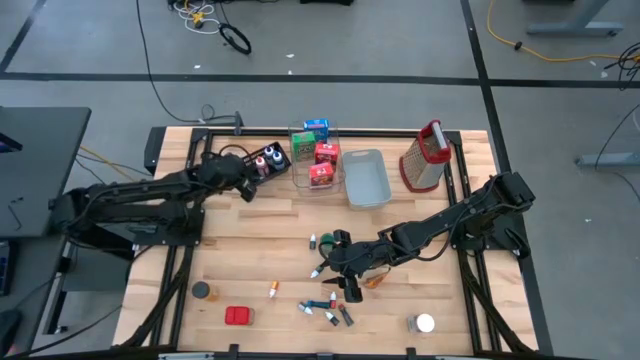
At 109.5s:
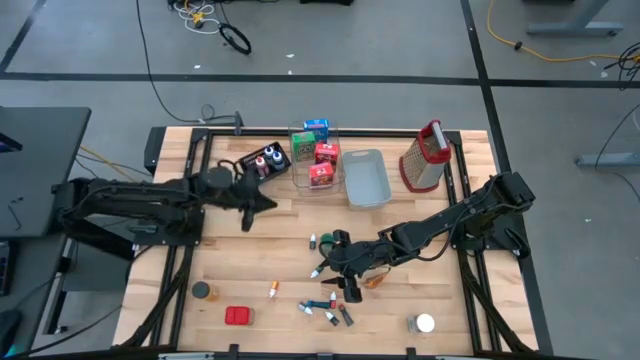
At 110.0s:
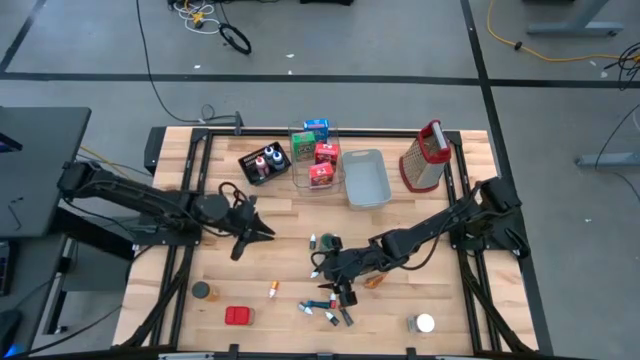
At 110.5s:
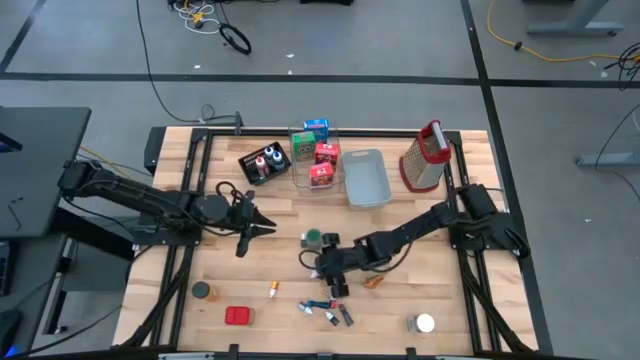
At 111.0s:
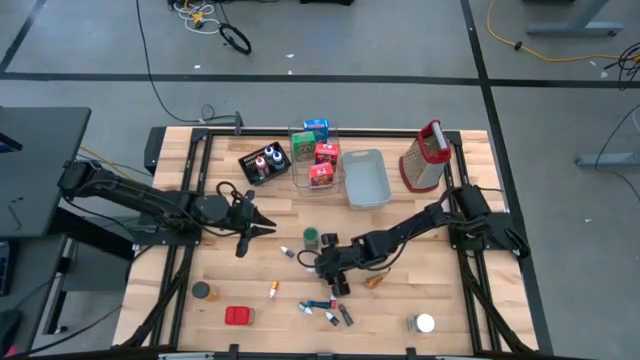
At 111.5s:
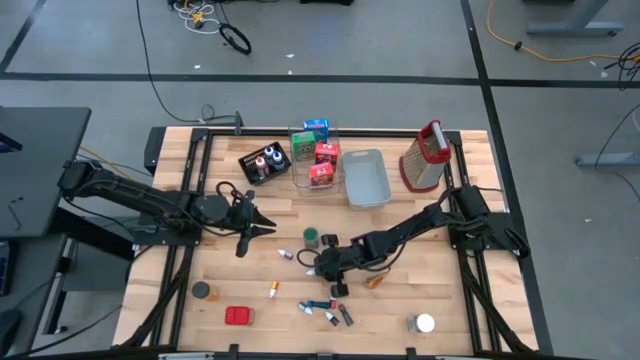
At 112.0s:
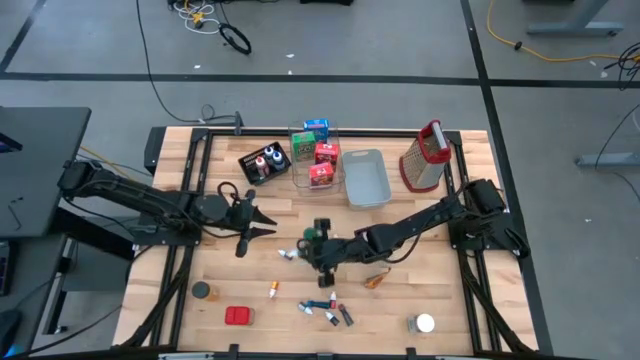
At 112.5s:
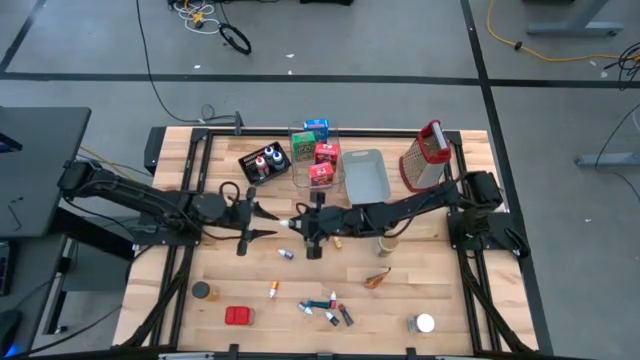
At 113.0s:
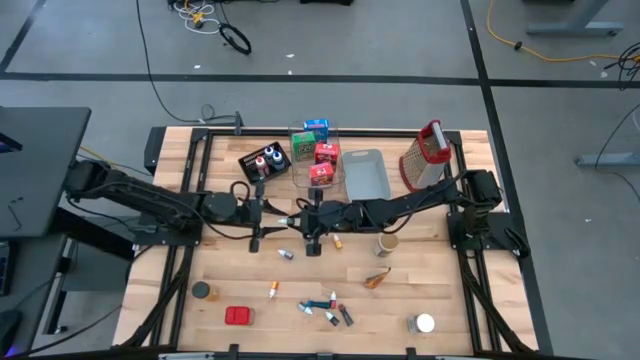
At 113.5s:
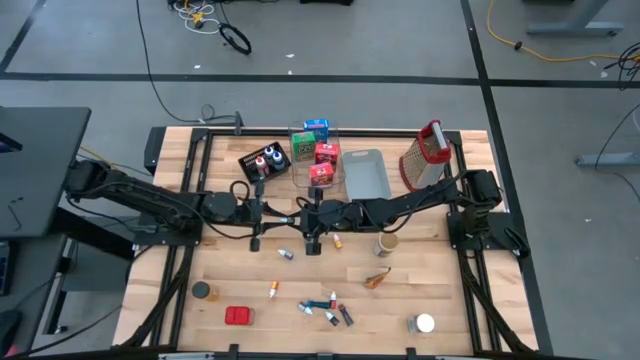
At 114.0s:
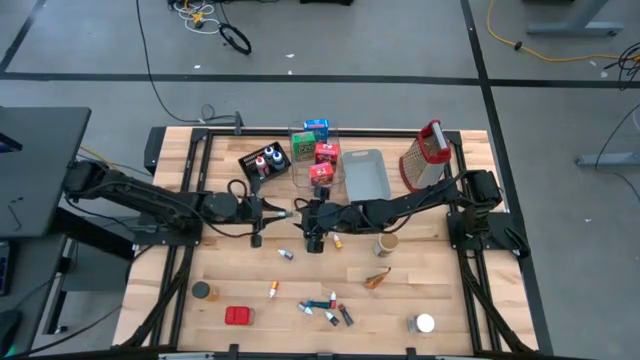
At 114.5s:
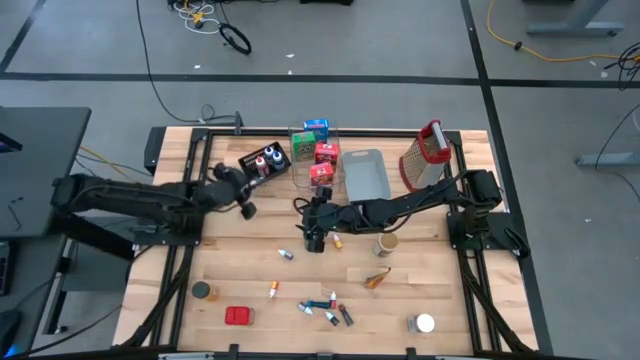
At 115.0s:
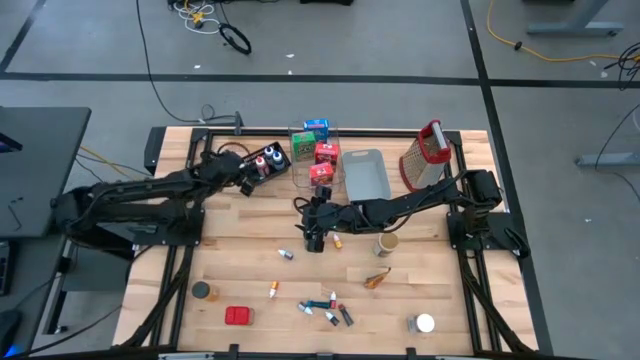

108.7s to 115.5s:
Task: Pick & Place Kitchen Items
Put the small green food coloring bottle into the black bin

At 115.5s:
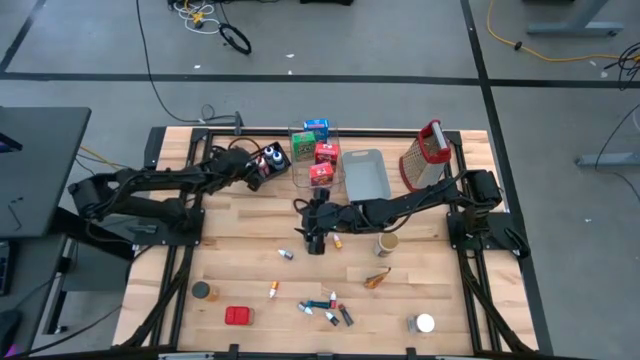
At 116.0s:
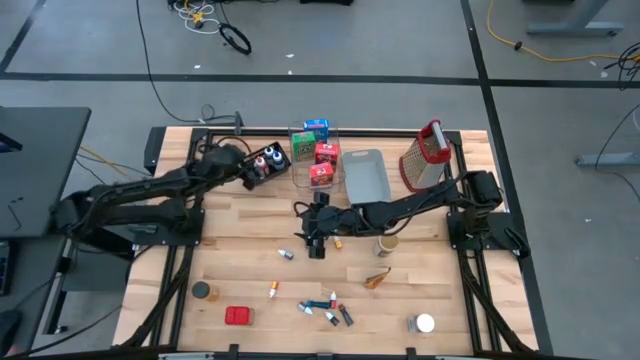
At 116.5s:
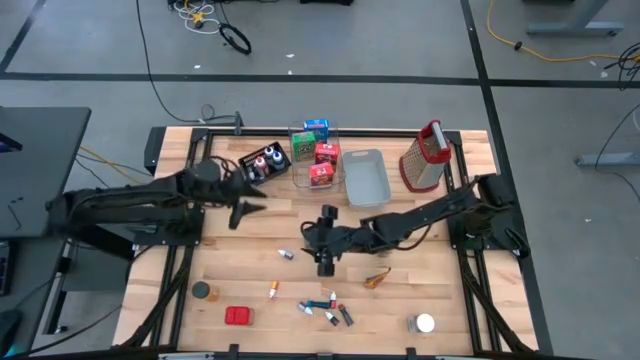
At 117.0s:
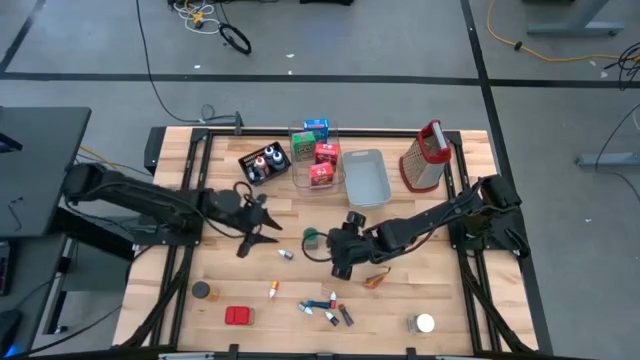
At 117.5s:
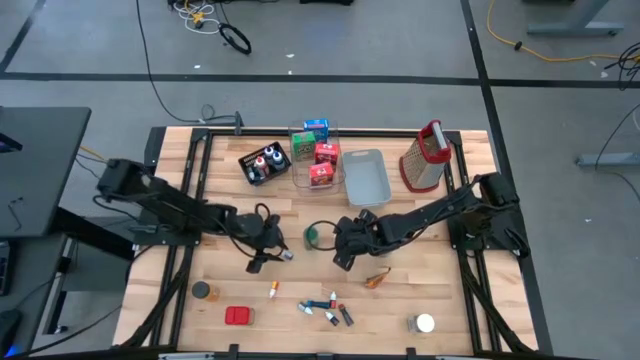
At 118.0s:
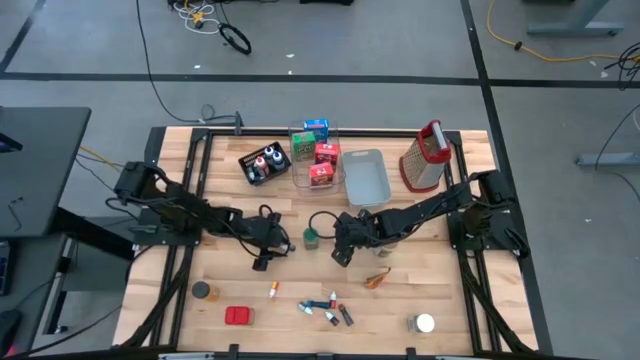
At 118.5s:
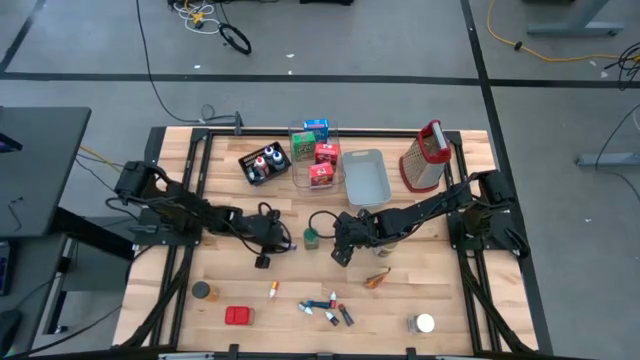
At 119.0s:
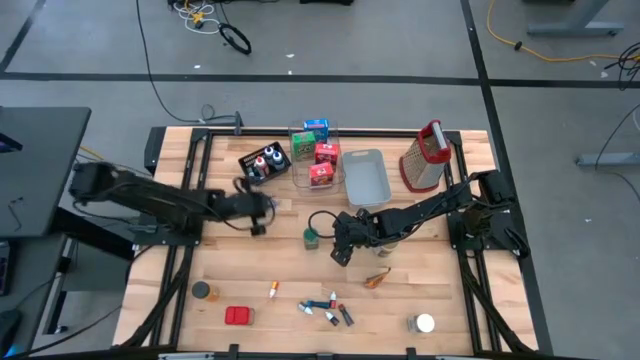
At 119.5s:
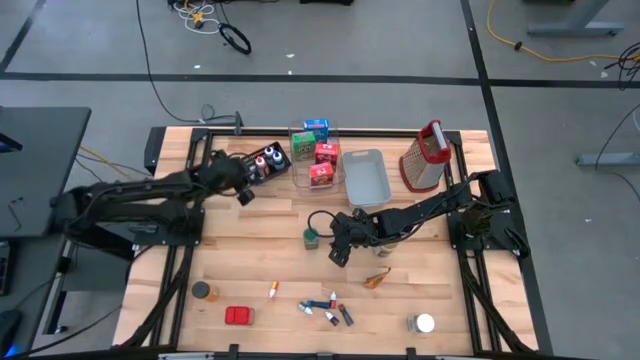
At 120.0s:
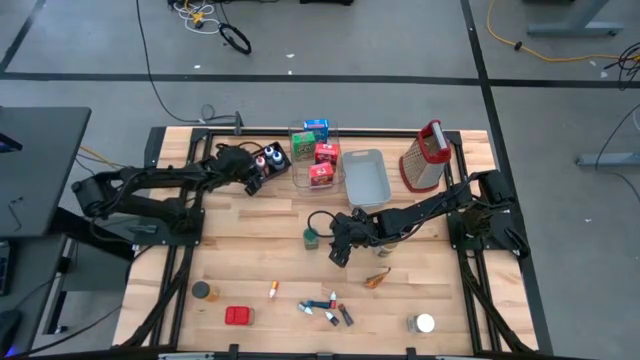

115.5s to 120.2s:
Put the small violet food coloring bottle into the black bin

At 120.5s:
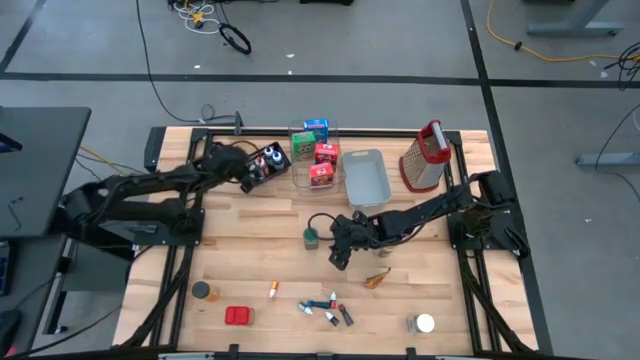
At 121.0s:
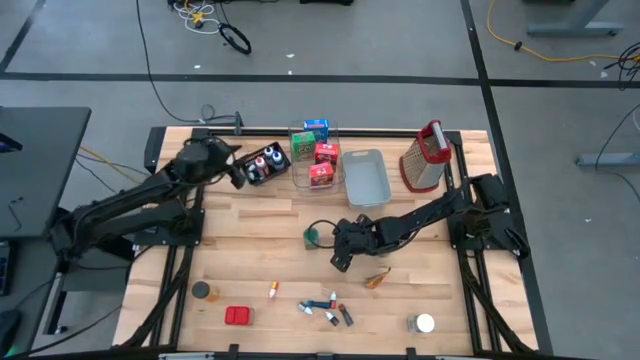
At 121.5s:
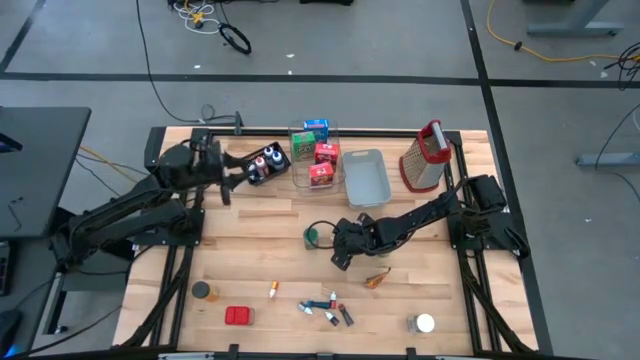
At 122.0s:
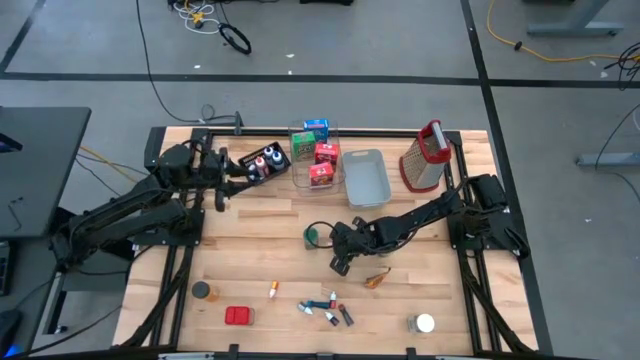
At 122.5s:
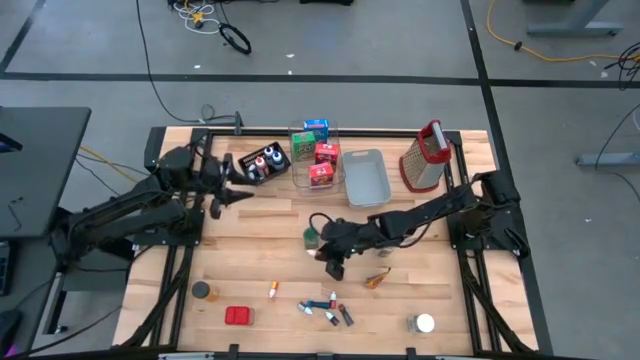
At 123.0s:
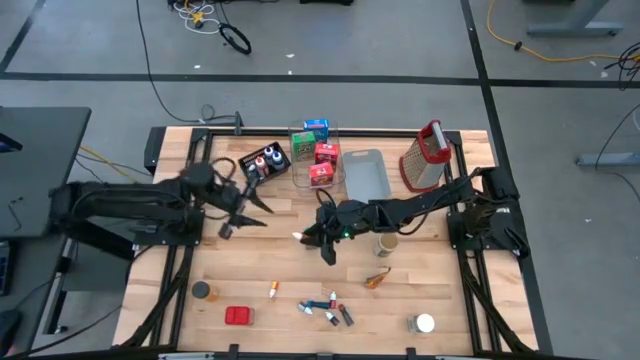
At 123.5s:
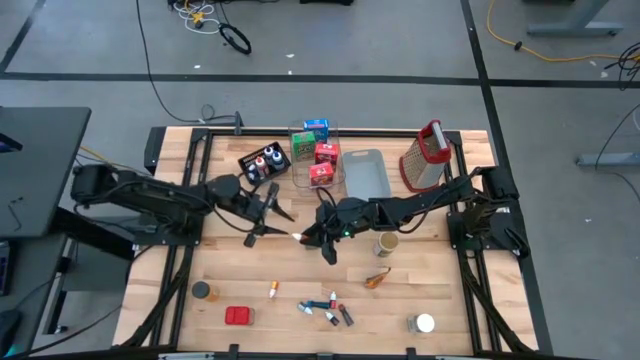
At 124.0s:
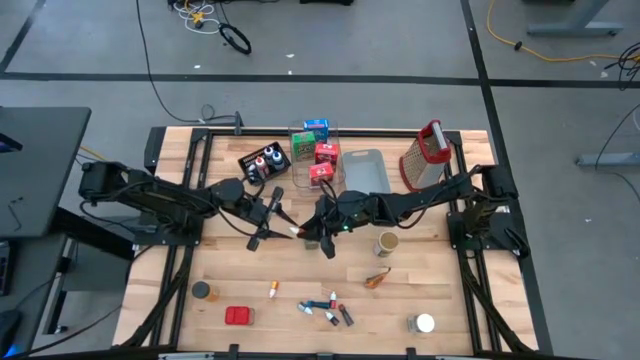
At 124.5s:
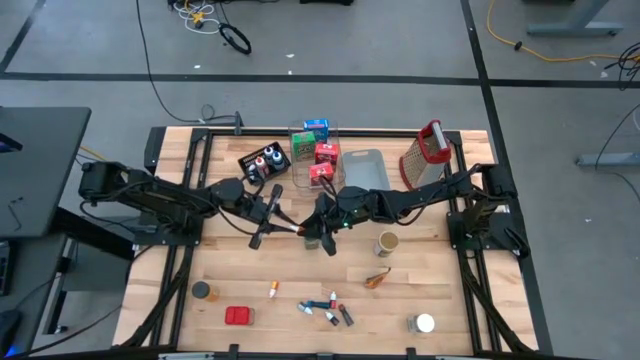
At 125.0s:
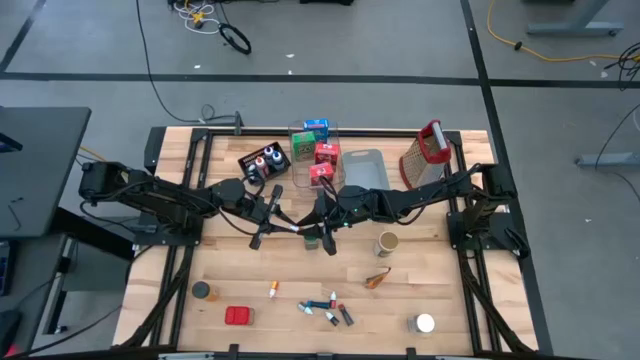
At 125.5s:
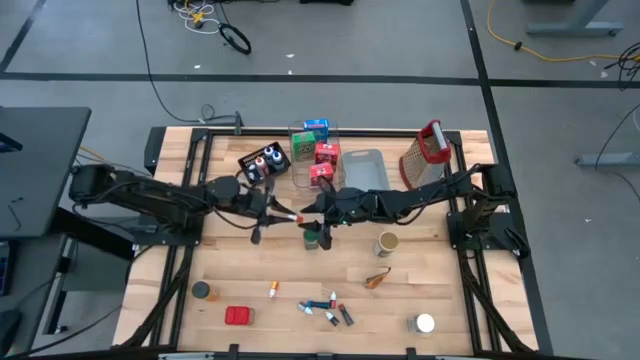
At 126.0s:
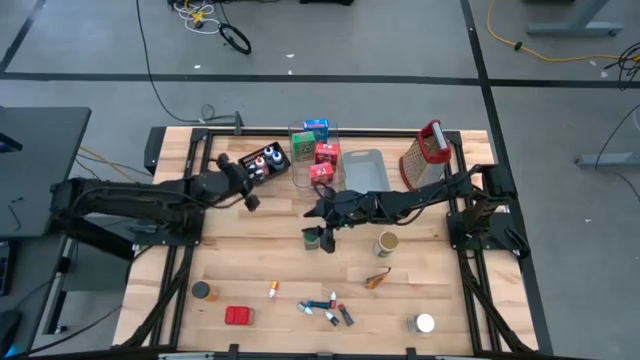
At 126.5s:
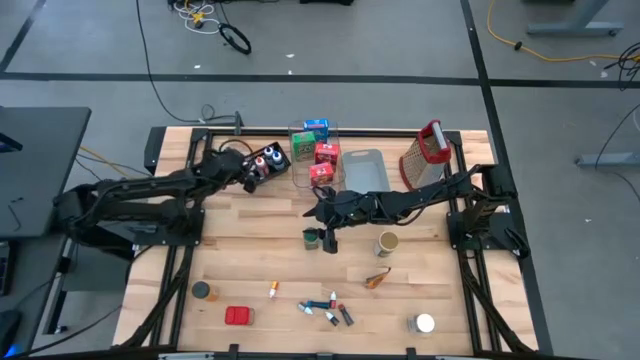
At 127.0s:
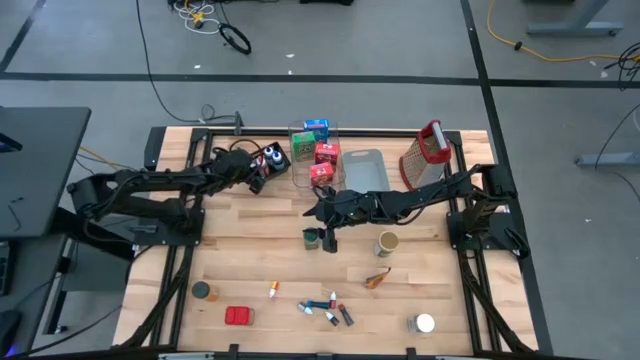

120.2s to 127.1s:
Put the right small yellow food coloring bottle into the black bin

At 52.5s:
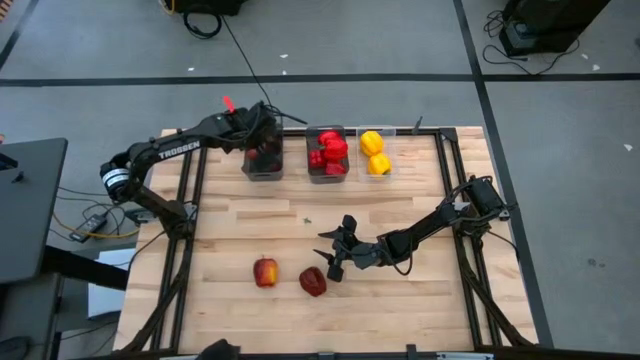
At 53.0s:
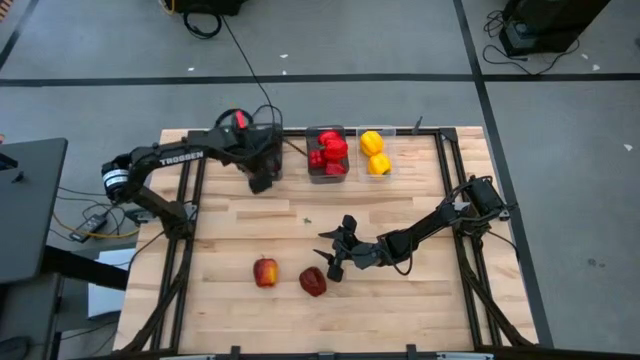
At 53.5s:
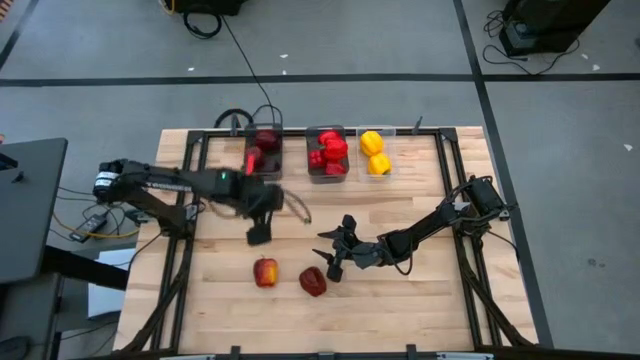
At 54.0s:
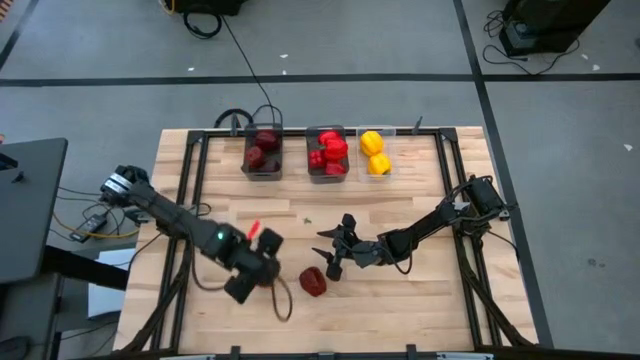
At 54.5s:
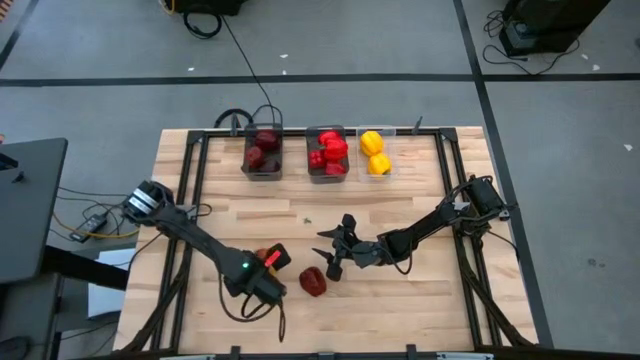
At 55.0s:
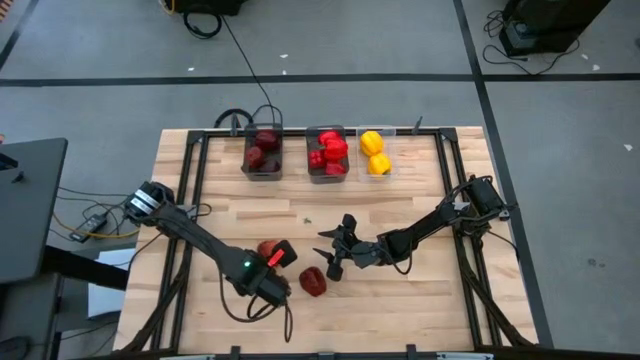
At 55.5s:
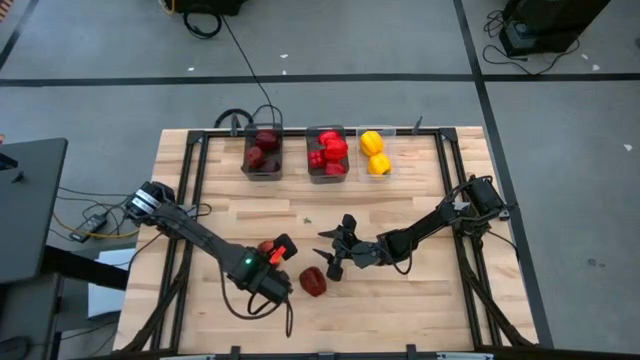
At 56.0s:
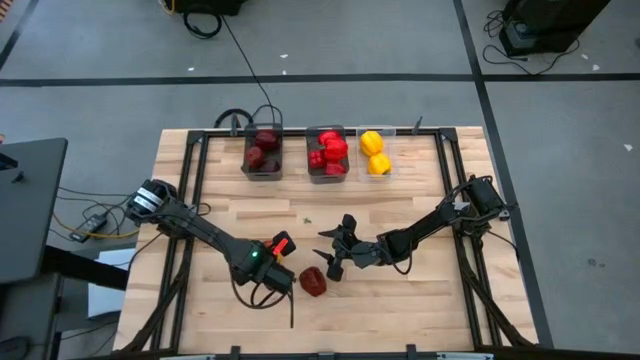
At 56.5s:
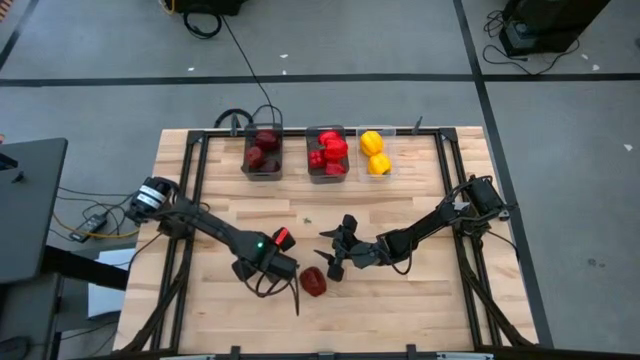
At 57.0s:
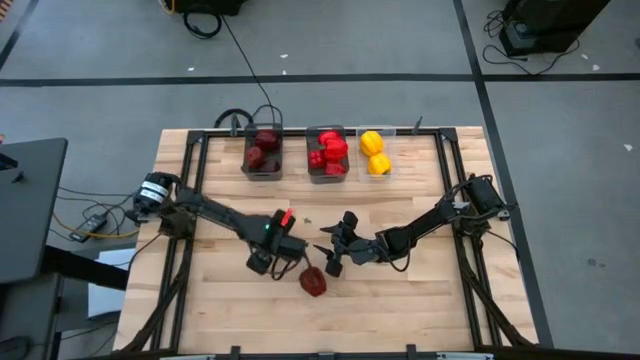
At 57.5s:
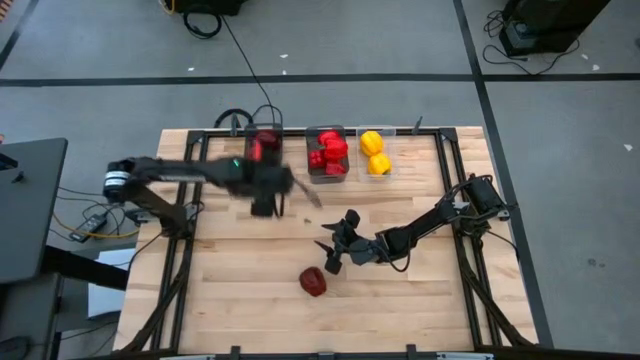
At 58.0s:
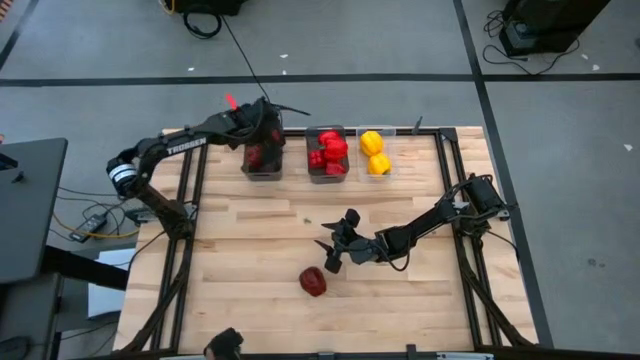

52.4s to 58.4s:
Task: Sort produce into baskets
Put the dark red apple into the left black bin
